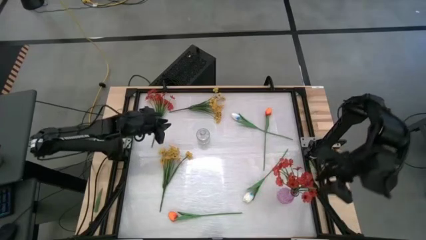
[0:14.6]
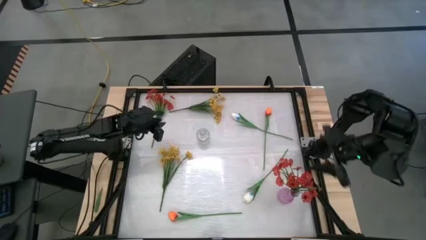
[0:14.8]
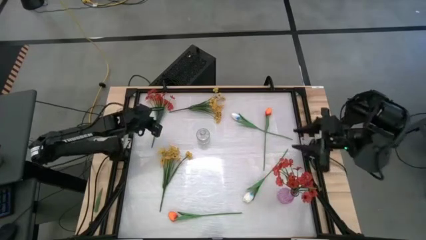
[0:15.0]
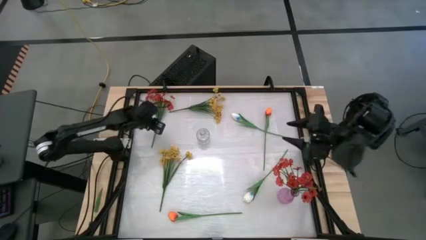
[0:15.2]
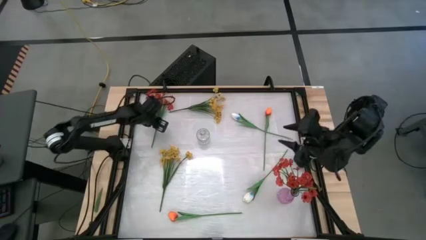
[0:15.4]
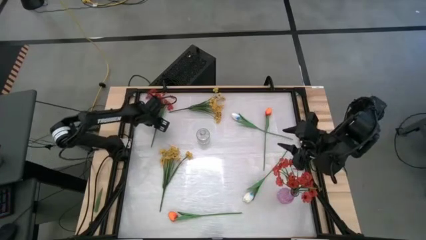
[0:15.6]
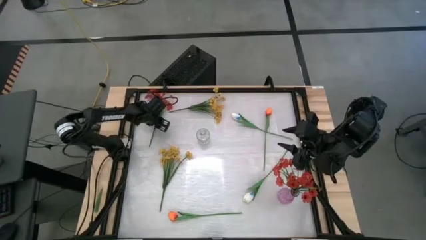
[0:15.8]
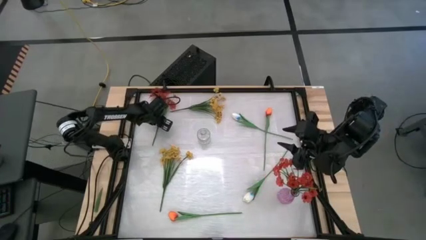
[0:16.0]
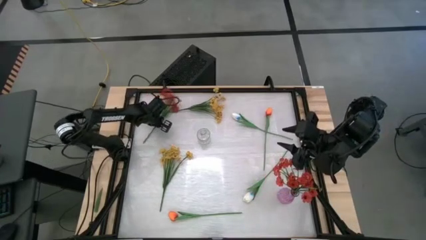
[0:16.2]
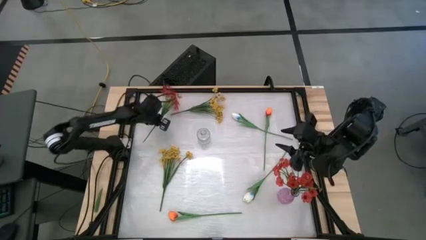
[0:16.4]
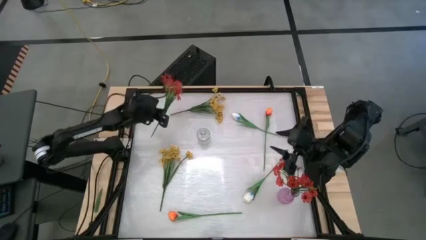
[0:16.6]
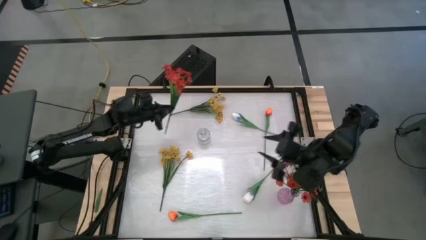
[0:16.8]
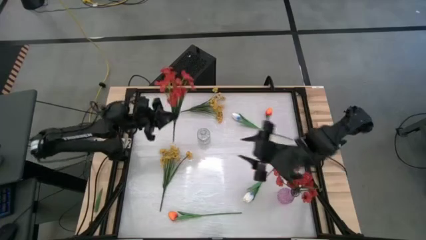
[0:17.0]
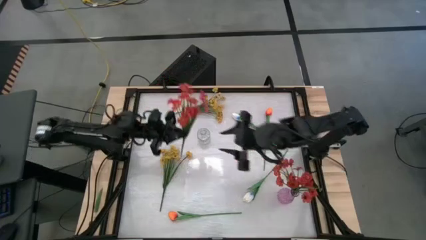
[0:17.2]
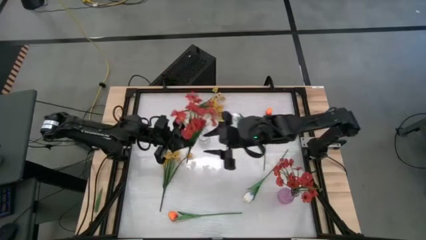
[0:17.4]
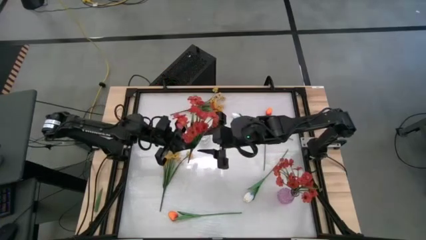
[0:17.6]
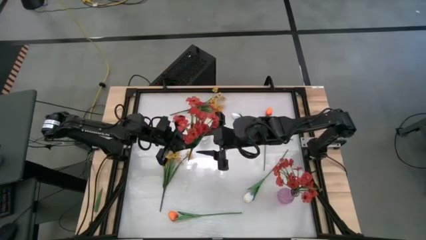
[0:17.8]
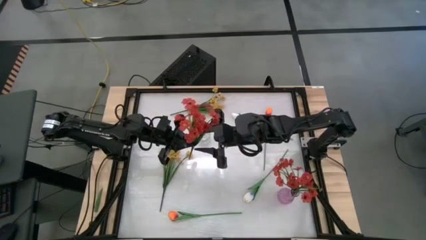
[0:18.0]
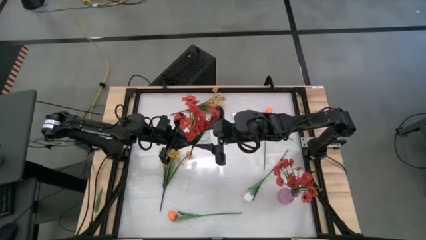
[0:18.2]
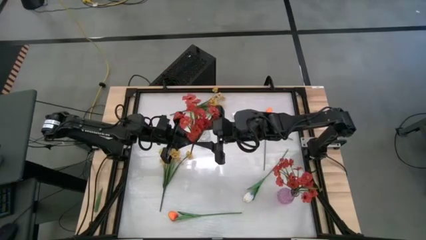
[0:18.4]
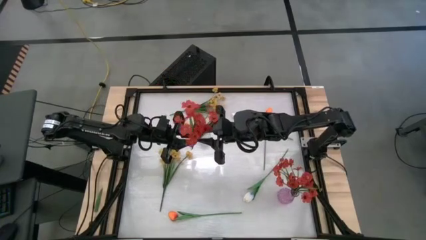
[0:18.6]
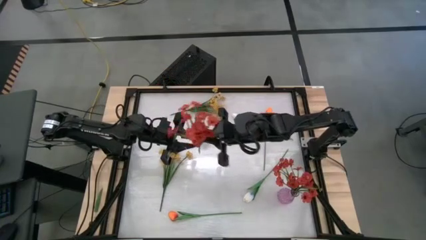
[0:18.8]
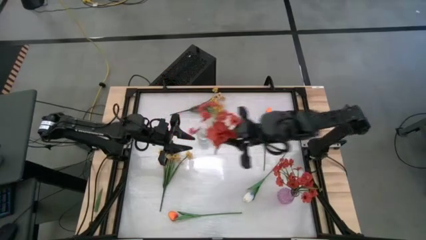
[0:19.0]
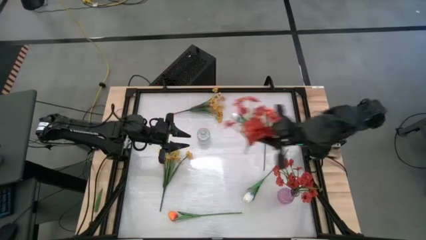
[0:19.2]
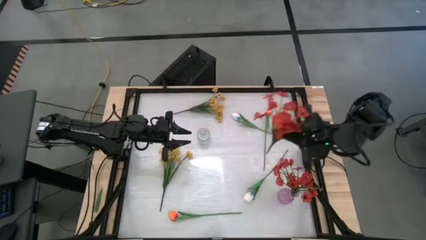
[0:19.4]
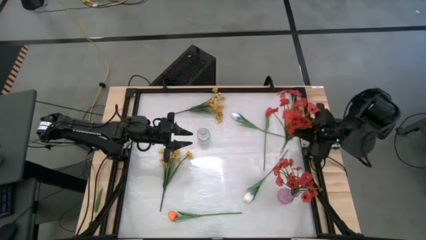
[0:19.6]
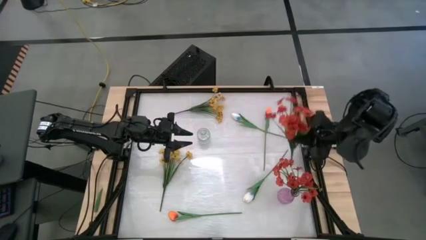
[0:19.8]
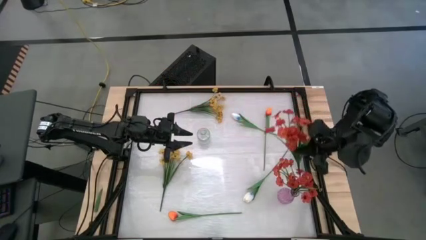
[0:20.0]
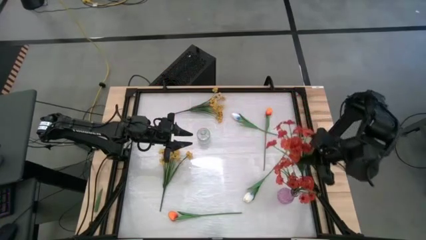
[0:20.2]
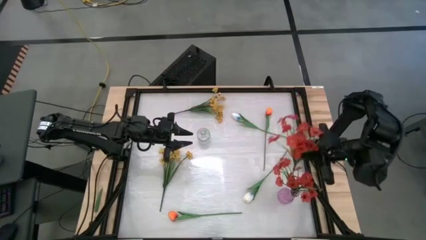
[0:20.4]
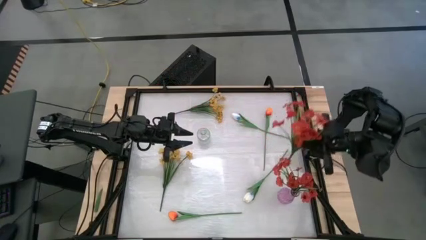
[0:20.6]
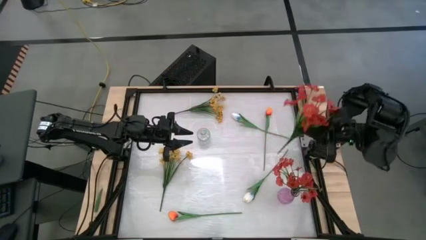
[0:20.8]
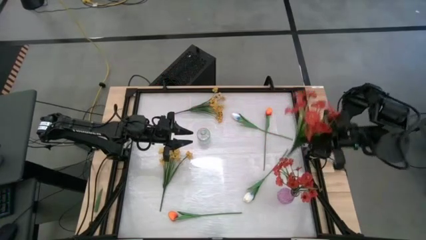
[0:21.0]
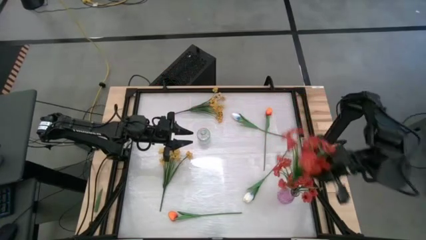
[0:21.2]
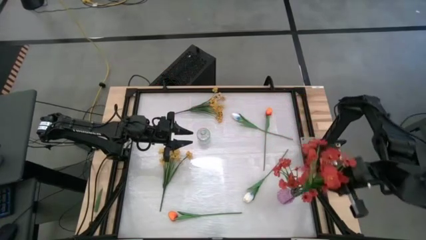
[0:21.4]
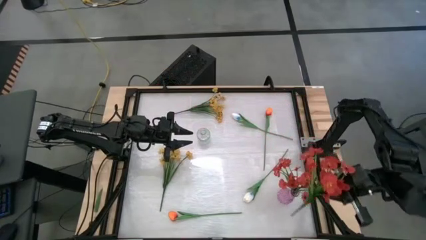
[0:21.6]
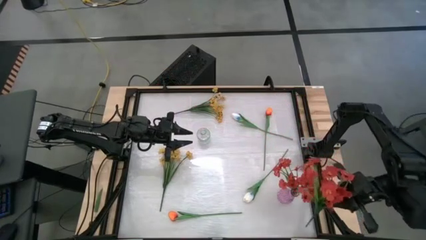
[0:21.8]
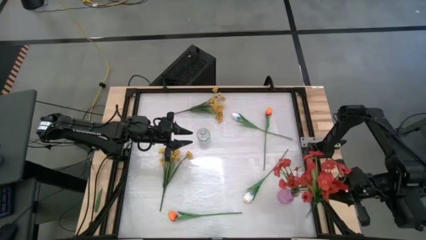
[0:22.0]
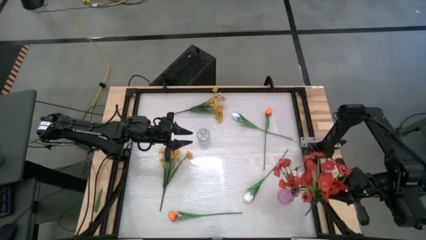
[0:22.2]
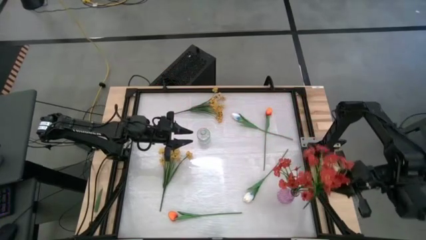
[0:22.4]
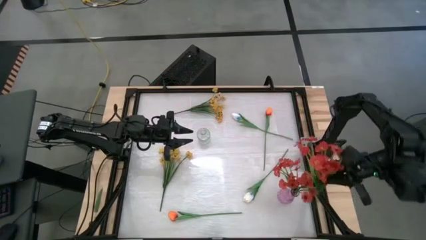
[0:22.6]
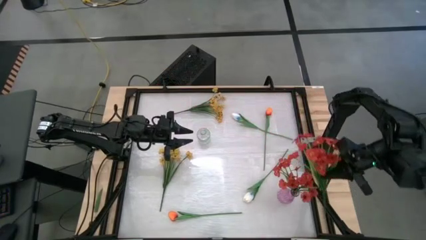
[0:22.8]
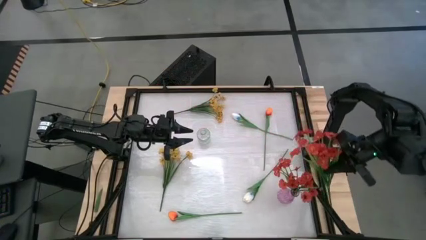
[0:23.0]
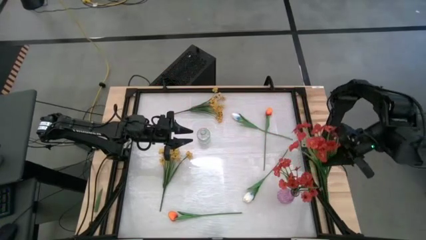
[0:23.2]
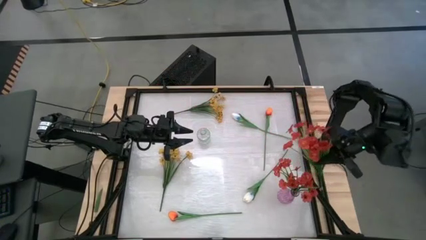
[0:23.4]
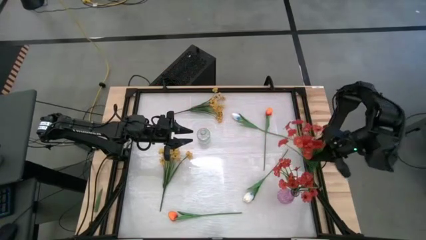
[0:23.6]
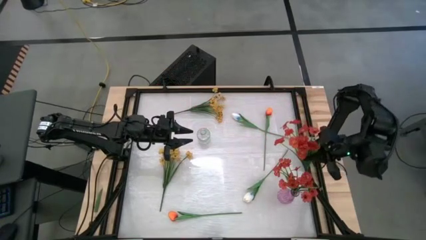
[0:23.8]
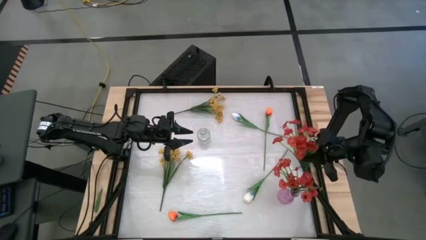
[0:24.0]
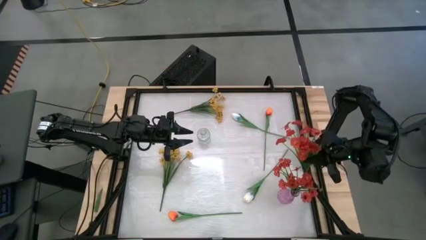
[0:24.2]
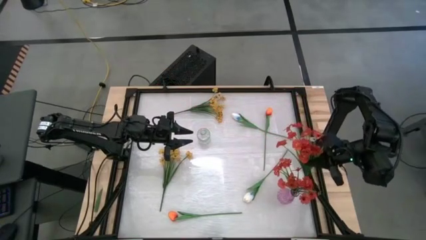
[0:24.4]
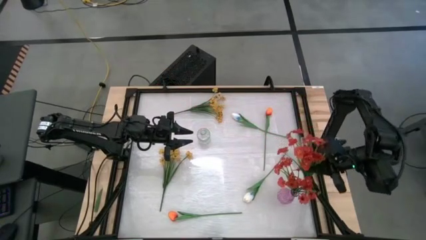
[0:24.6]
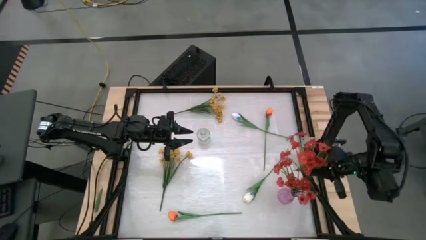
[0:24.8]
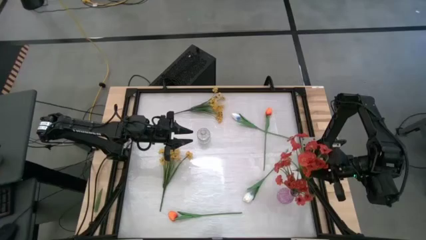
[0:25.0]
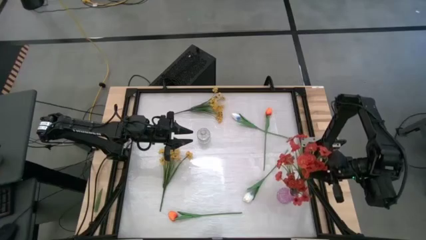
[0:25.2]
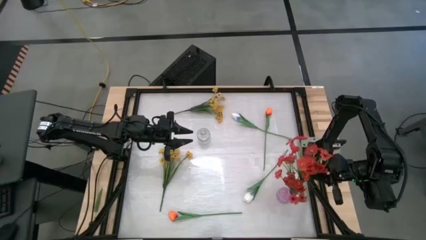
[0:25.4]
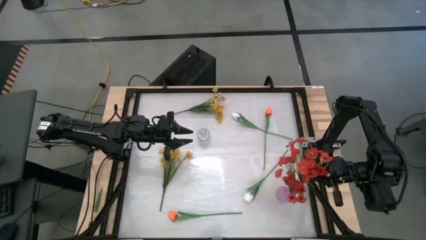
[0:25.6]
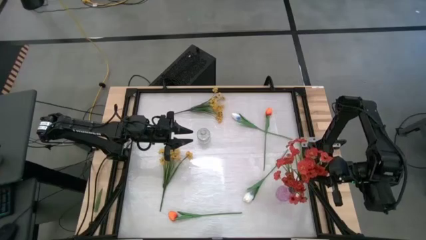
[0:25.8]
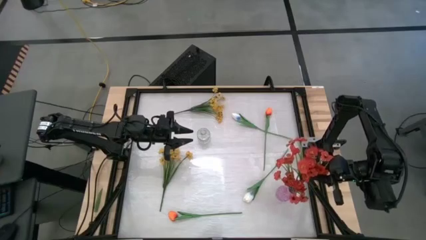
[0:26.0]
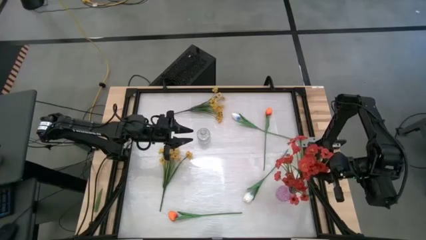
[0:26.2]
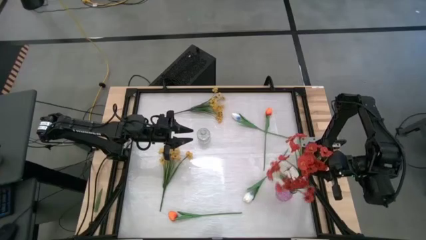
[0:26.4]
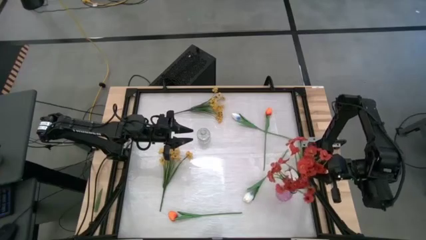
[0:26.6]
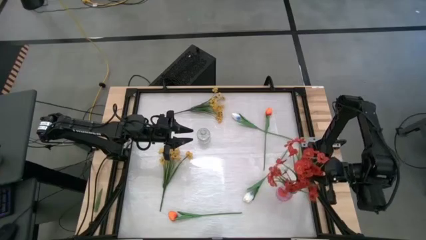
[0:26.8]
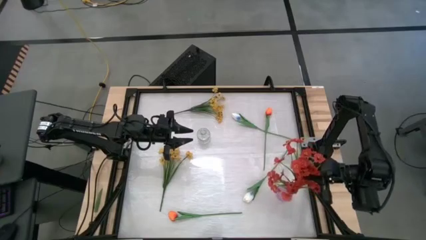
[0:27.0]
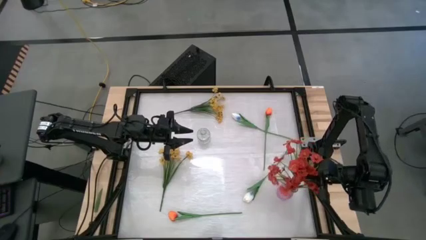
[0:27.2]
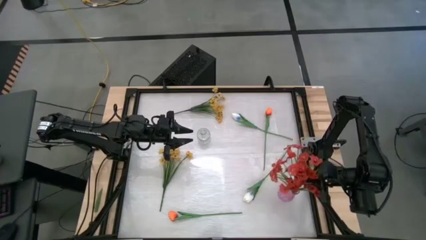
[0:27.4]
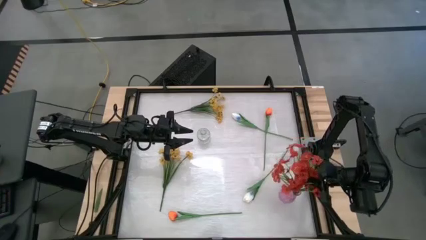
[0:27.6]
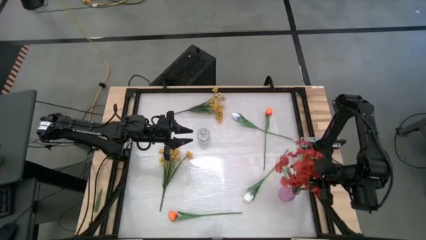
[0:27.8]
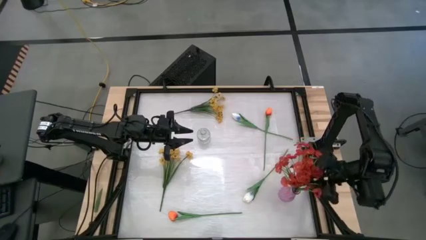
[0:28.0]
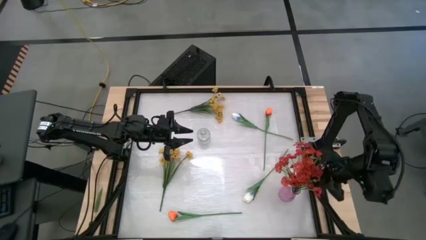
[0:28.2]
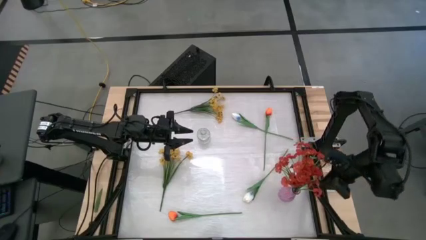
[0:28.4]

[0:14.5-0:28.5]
Task: Sort flowers into vase by color
Put the red flowers into the pink vase
